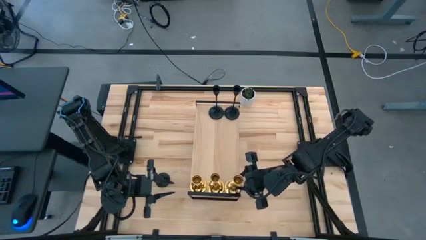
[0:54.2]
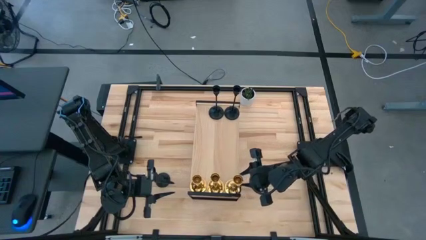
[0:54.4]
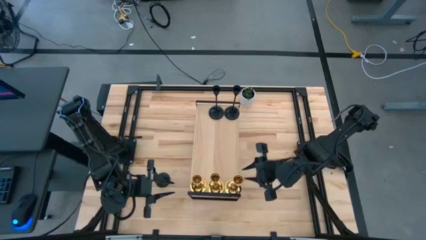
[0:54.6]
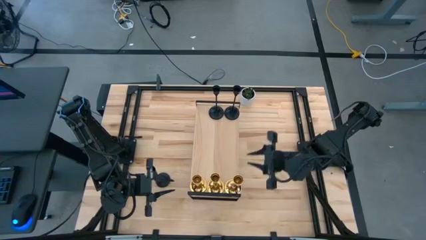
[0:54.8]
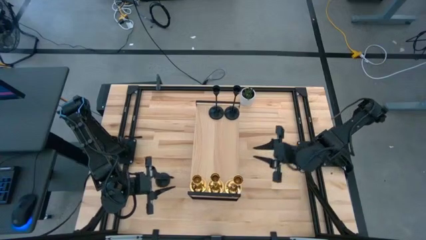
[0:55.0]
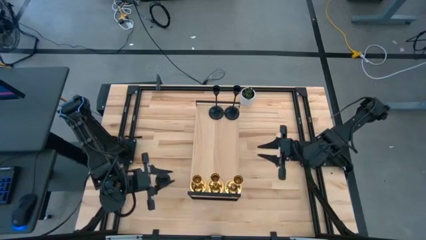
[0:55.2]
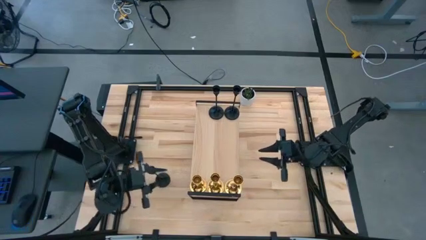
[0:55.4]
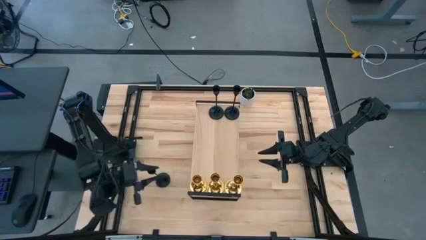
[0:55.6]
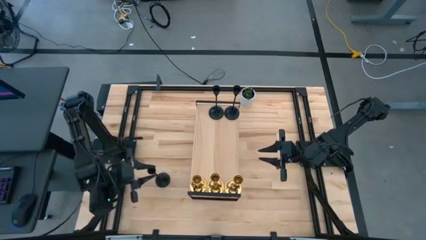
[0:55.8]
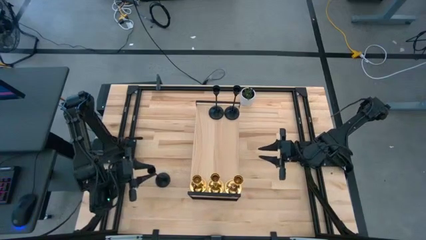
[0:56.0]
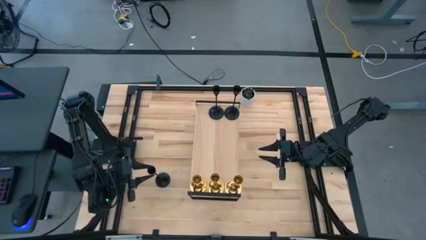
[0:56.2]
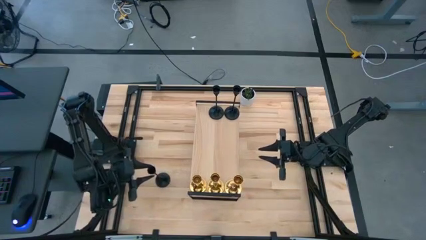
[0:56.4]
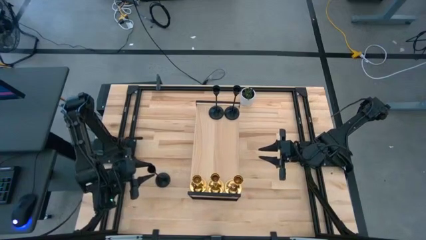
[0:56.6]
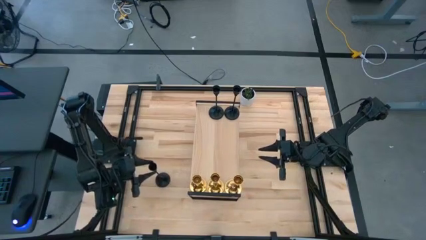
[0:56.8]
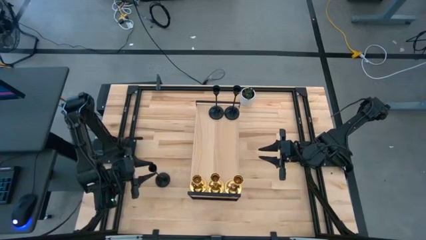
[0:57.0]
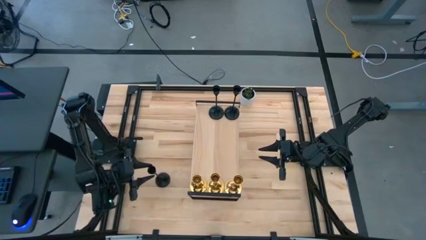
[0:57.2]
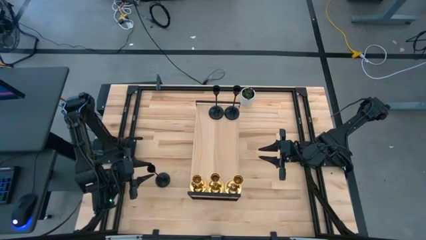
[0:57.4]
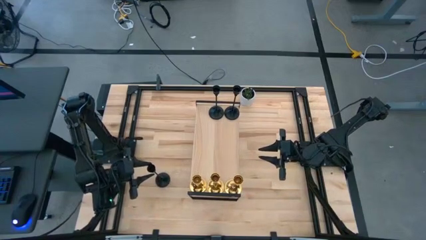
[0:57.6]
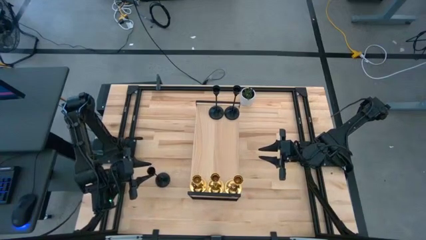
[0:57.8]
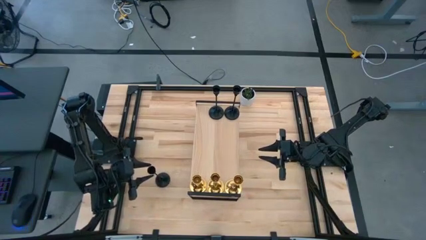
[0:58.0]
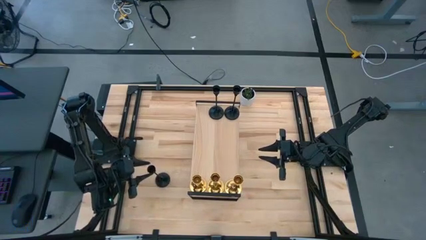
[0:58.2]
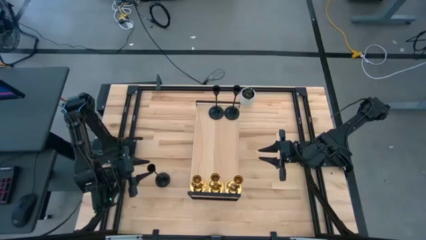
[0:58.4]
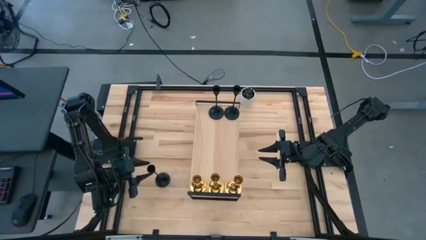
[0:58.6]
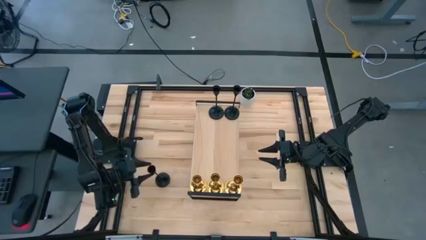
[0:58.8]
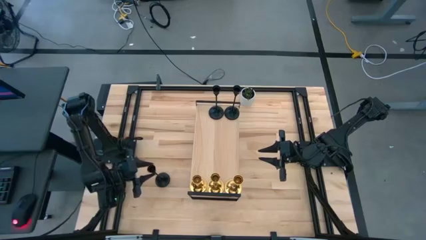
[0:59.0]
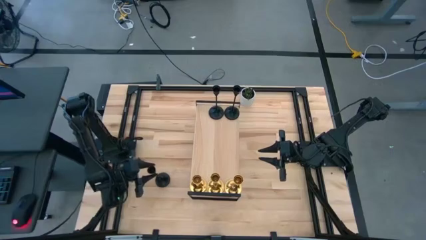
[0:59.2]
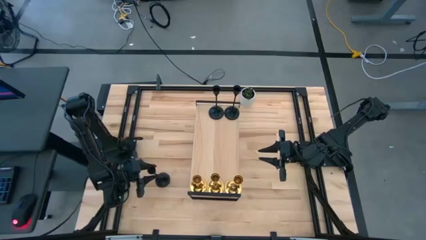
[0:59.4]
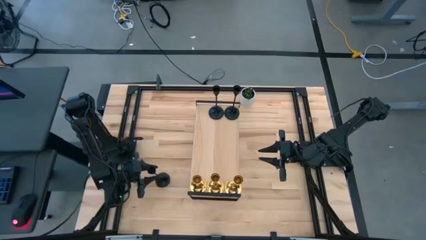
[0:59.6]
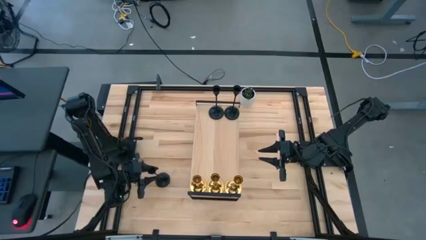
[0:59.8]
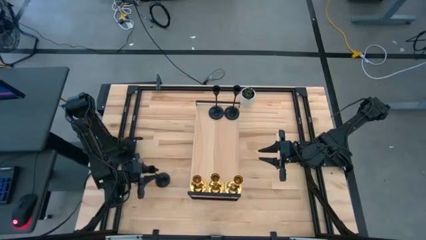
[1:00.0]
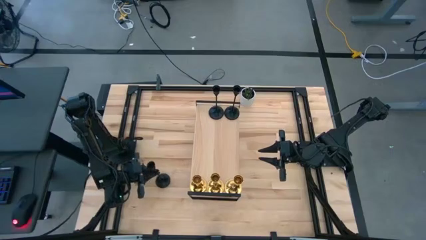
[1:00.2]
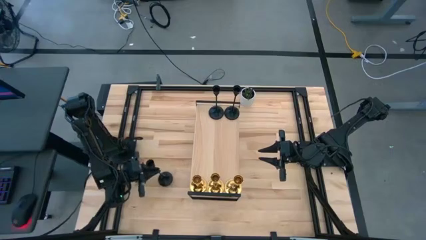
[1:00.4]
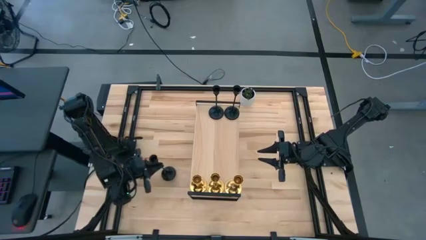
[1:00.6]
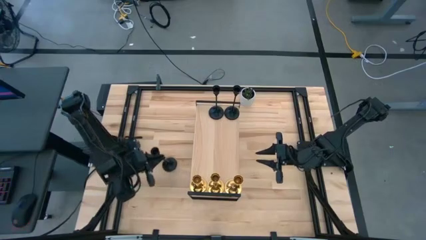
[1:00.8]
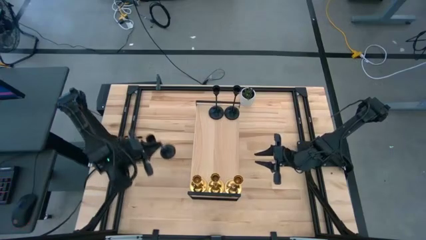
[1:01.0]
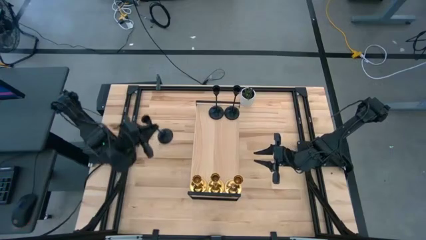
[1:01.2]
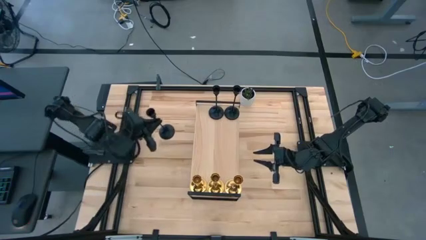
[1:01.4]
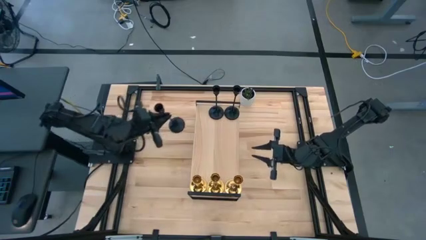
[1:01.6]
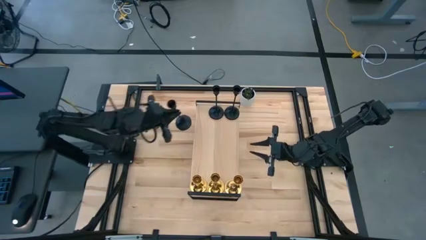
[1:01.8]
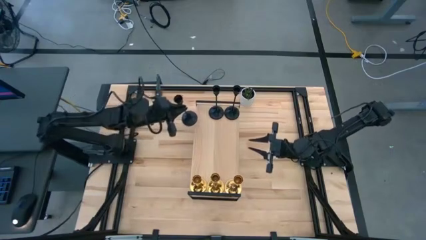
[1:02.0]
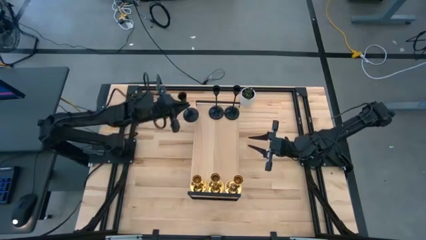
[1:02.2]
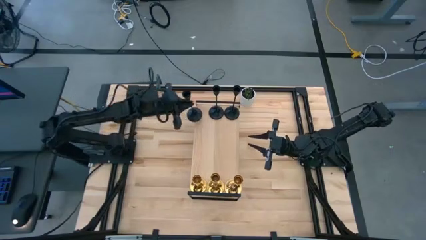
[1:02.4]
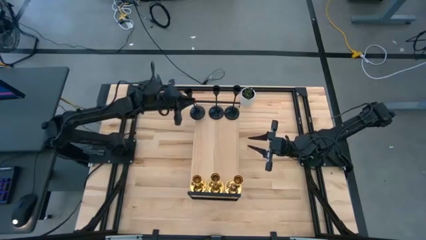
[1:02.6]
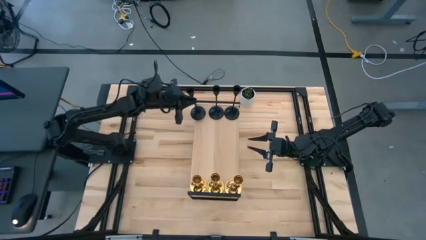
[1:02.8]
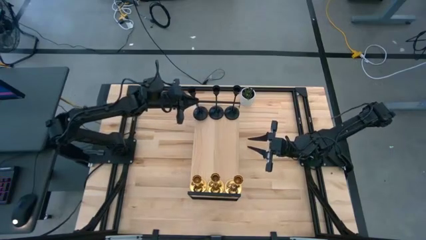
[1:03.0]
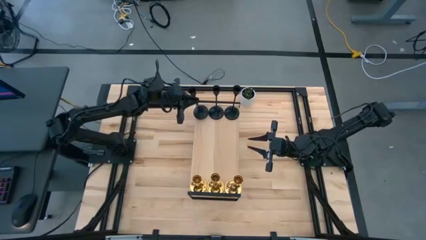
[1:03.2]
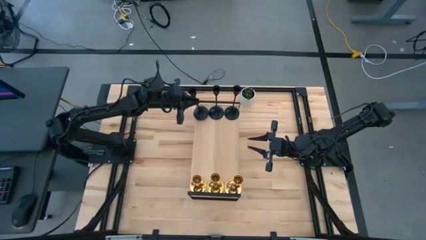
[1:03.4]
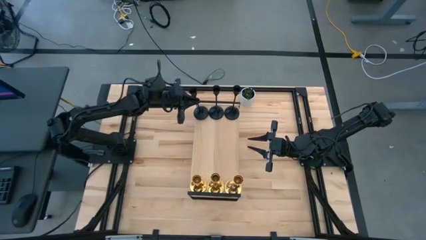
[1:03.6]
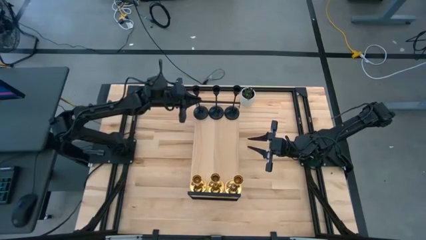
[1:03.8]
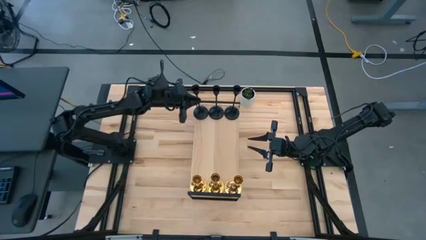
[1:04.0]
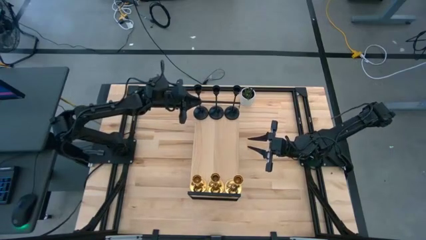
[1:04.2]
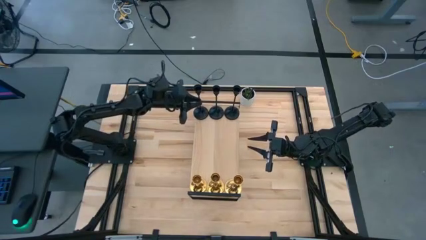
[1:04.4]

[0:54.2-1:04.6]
Task: Pick & Place candle stick holders
Align the black candle holder with the other black candle holder on the shelf

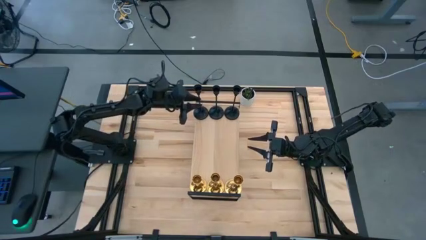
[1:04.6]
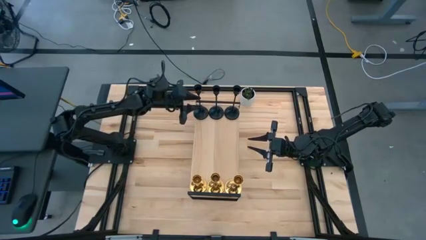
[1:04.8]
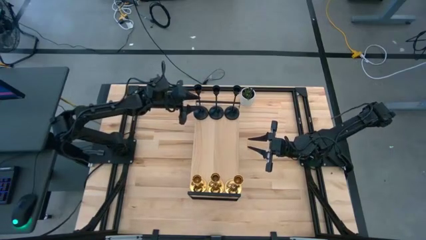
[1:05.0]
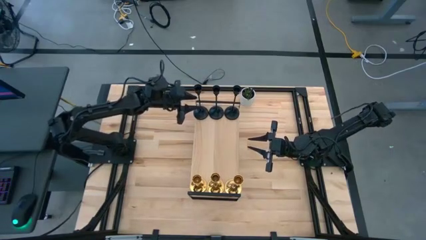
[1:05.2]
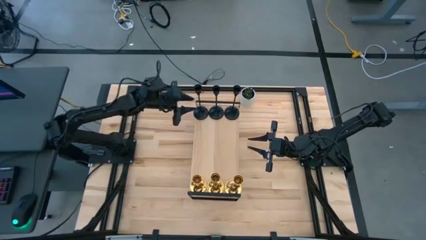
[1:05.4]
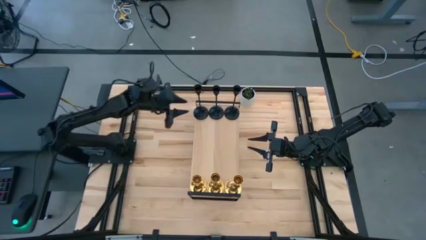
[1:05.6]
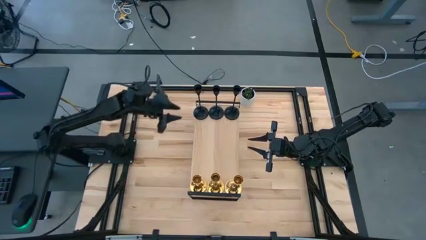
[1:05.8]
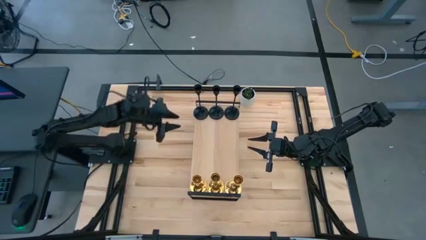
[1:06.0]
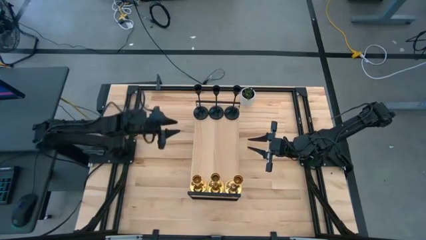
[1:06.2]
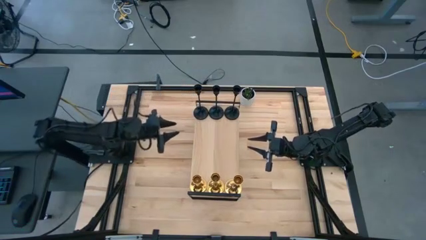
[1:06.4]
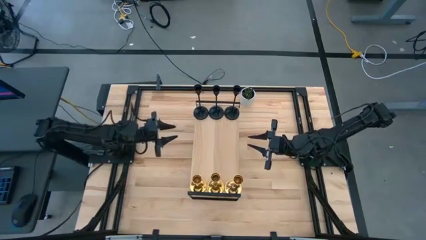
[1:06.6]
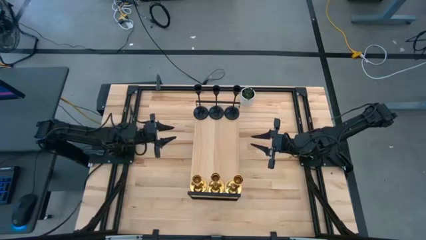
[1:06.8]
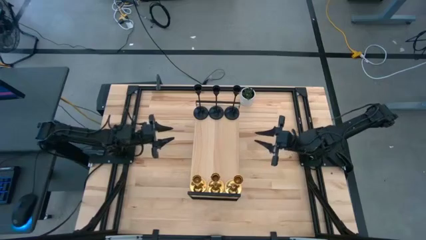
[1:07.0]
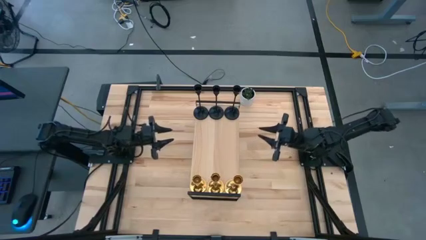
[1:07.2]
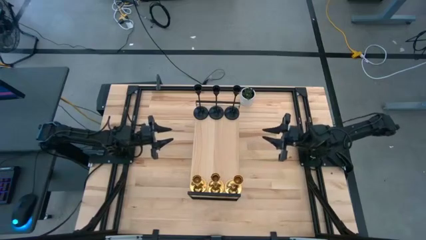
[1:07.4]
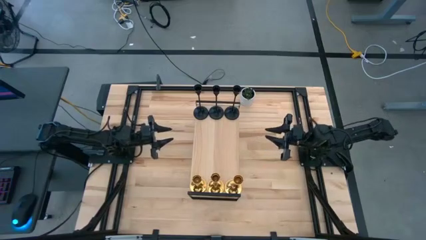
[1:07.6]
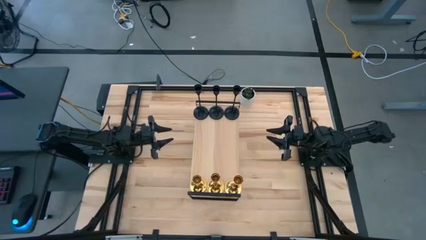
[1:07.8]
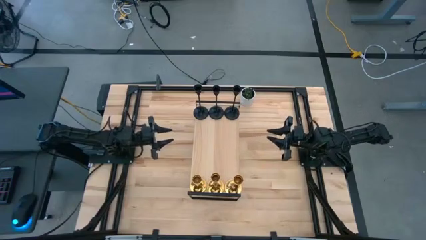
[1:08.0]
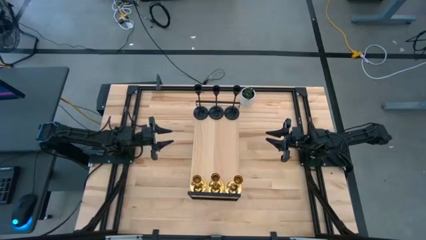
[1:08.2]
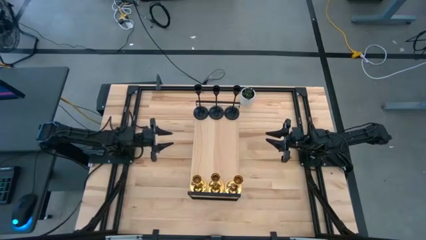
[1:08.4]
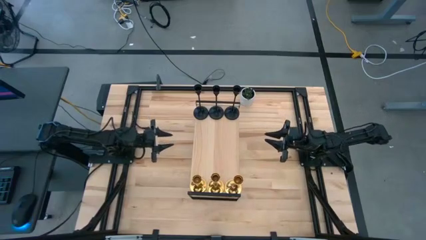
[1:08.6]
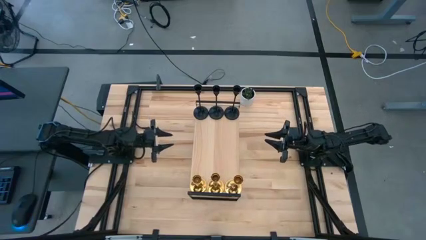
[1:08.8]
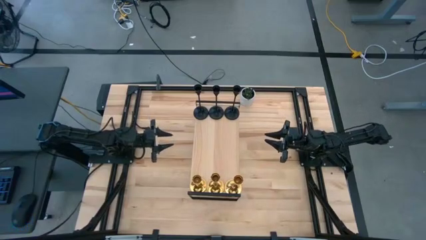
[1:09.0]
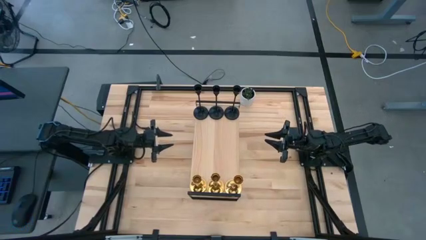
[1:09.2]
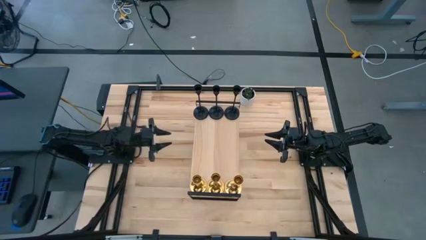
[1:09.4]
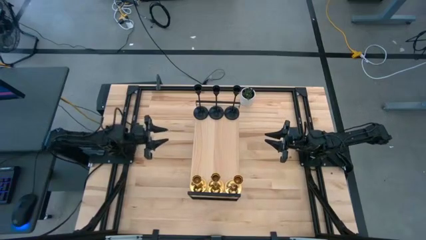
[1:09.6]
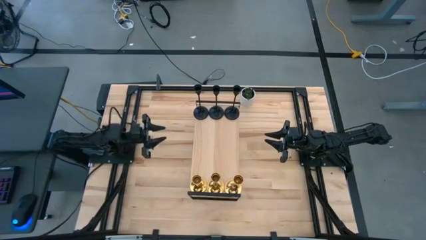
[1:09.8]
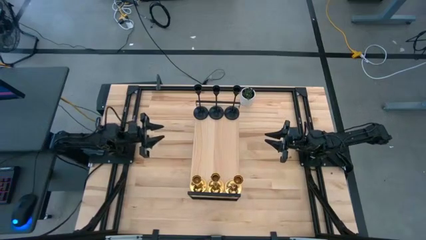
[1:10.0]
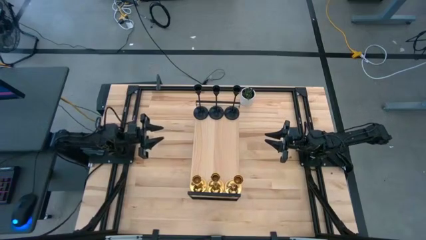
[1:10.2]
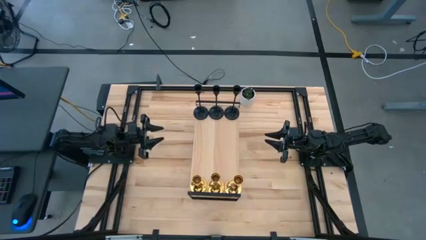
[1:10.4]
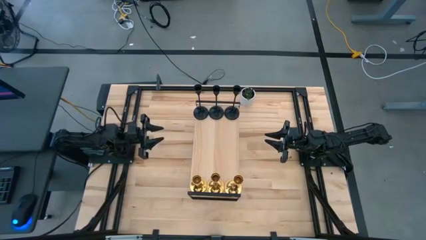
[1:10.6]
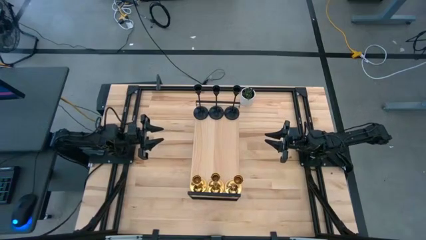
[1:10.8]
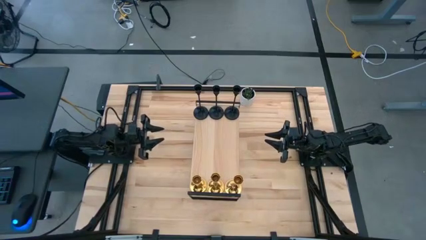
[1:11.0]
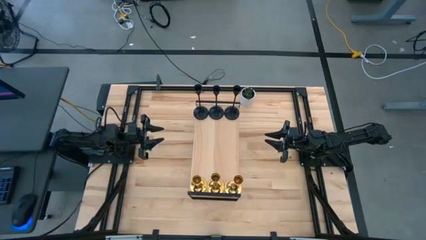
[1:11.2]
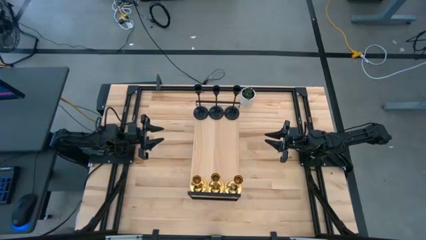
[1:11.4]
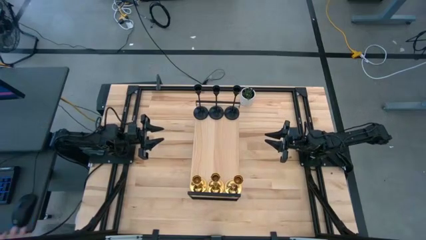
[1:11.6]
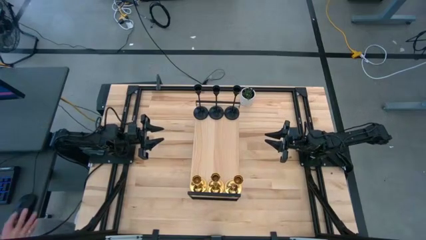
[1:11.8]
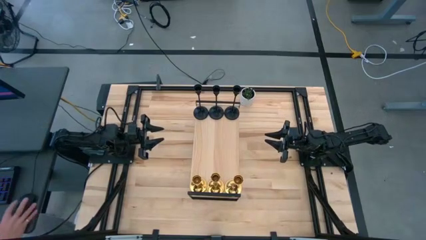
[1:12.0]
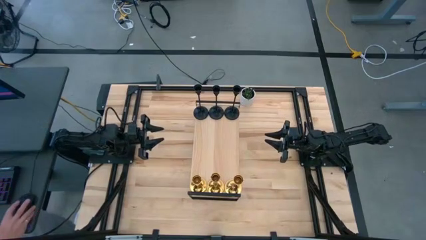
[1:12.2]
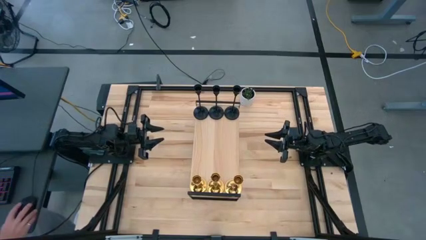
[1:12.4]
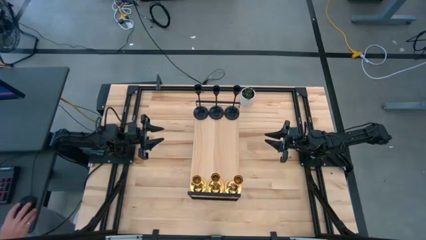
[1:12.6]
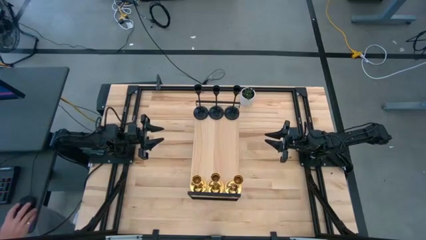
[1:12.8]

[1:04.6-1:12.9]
Return to home position
